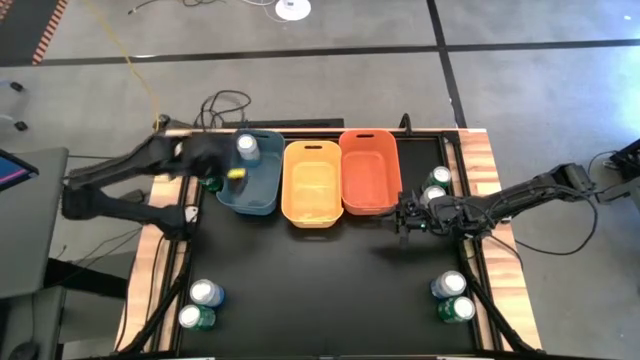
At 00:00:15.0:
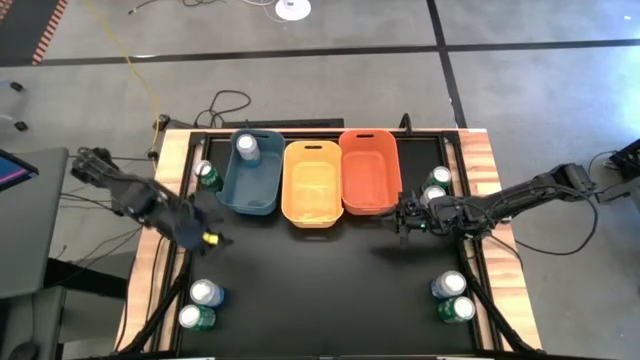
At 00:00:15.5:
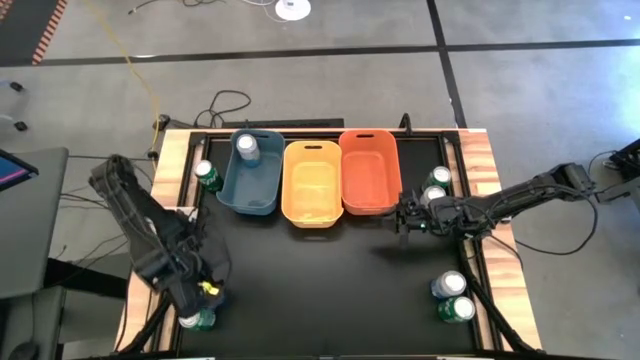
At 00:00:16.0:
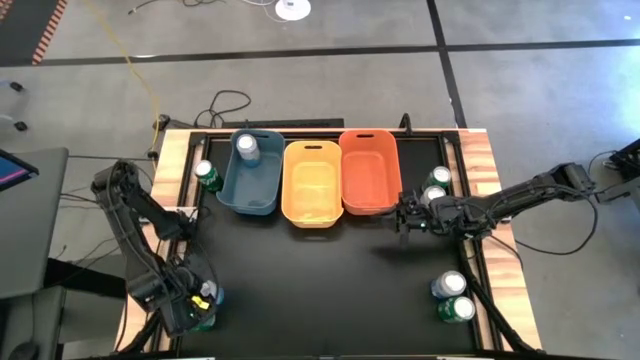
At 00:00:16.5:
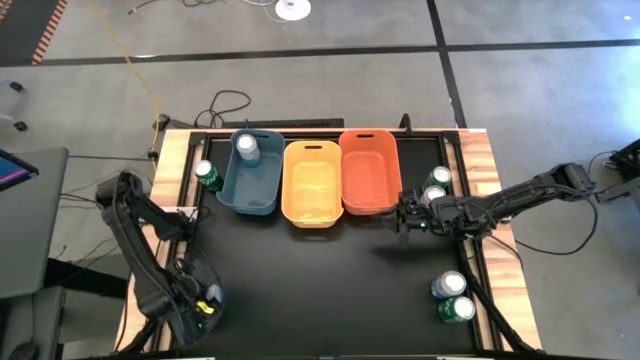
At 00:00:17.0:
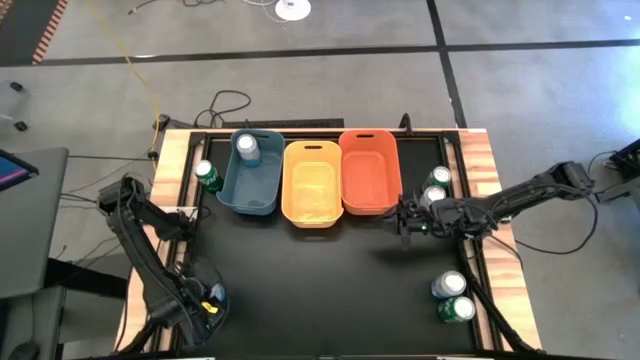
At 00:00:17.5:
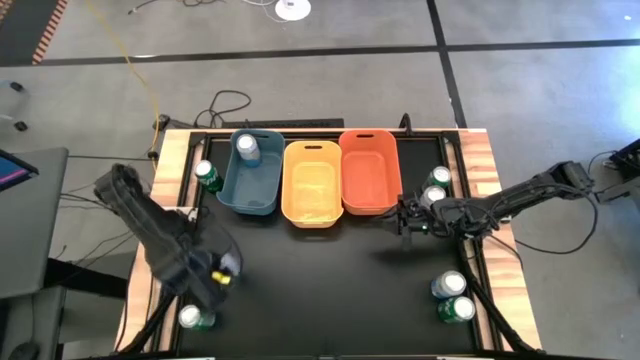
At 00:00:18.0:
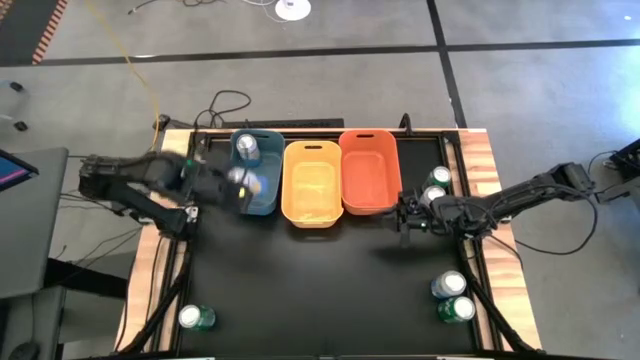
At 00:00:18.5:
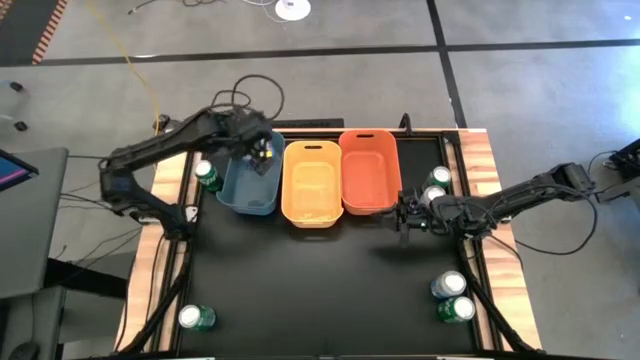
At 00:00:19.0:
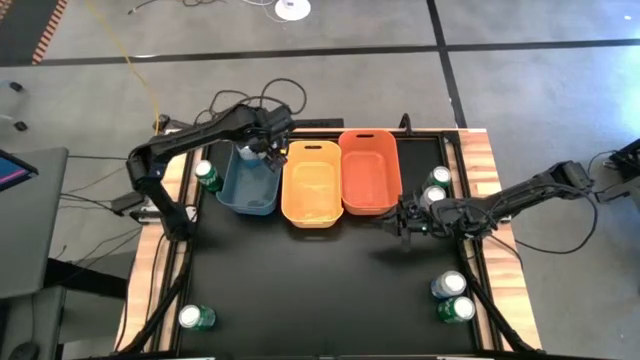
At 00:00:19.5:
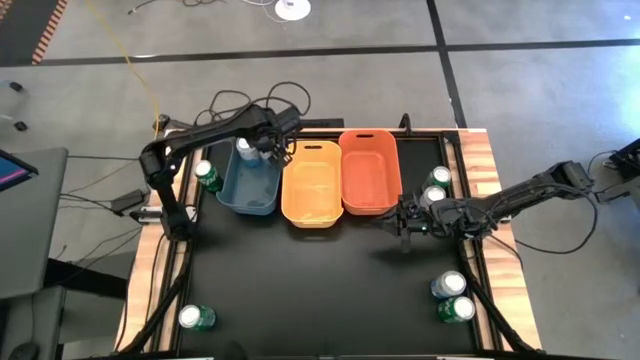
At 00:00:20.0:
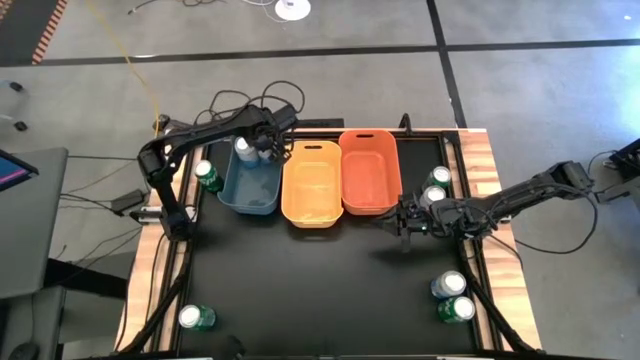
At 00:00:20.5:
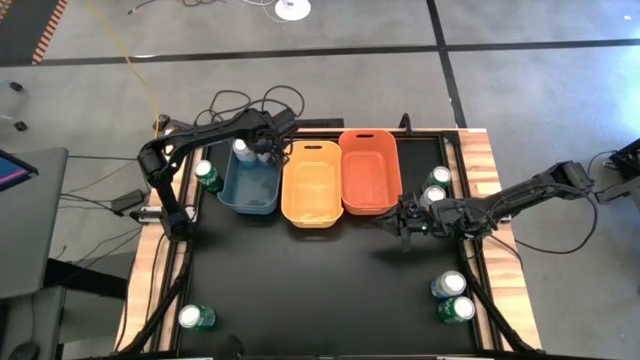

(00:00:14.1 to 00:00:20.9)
Task: Sort soda cans
Put the blue/white soda can into the blue bin

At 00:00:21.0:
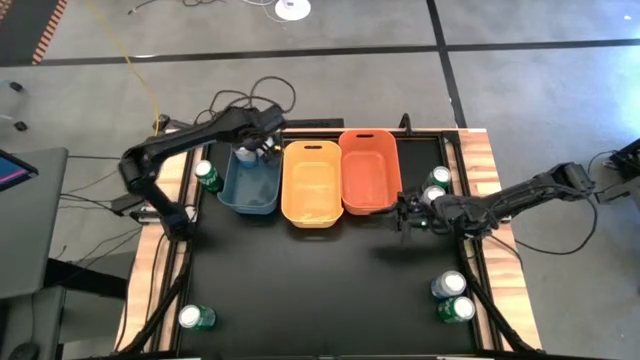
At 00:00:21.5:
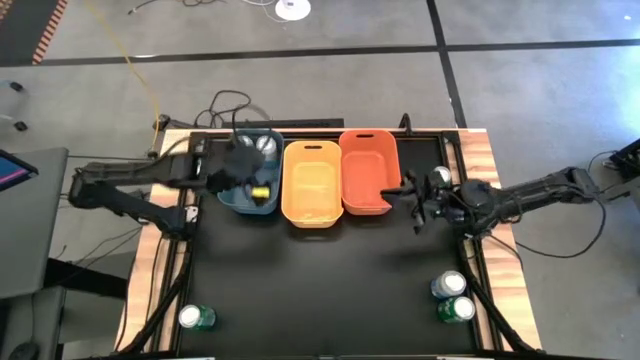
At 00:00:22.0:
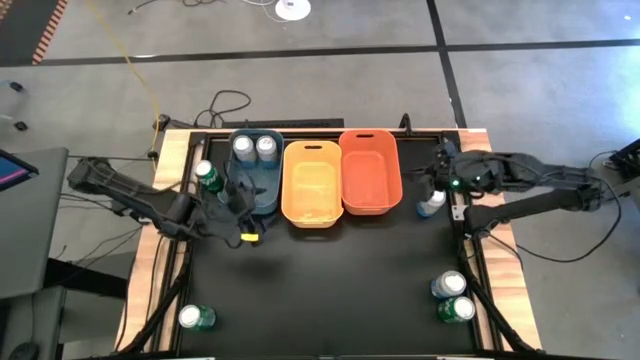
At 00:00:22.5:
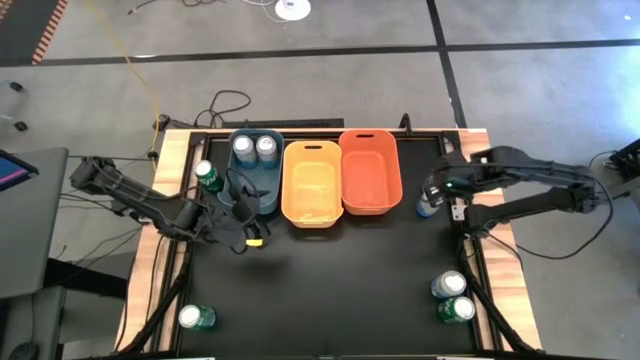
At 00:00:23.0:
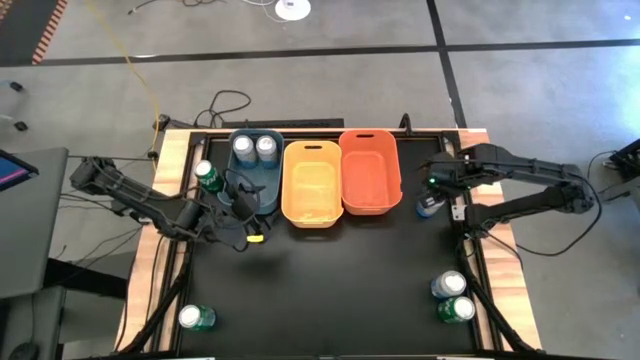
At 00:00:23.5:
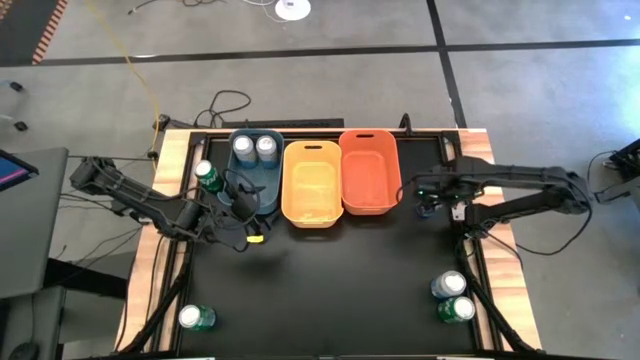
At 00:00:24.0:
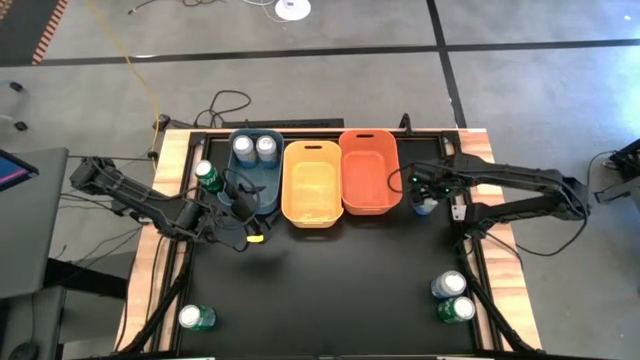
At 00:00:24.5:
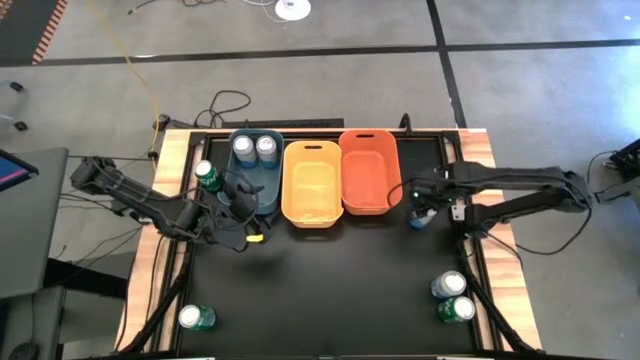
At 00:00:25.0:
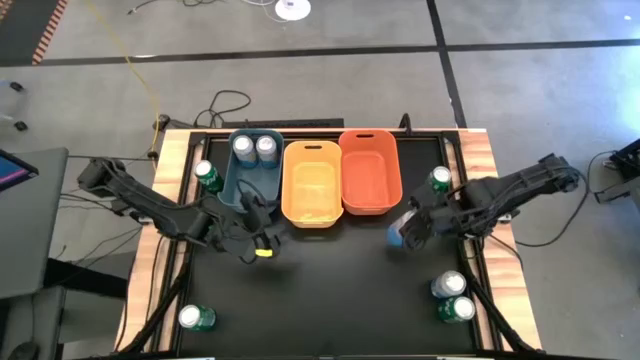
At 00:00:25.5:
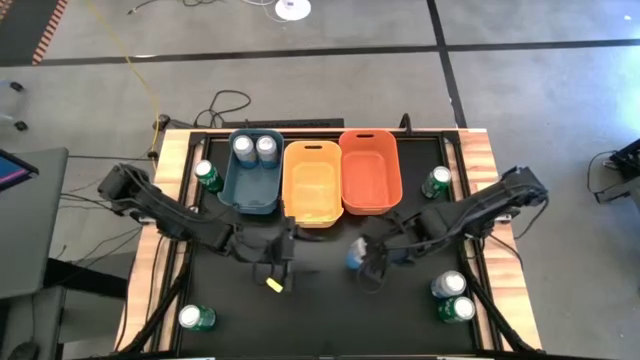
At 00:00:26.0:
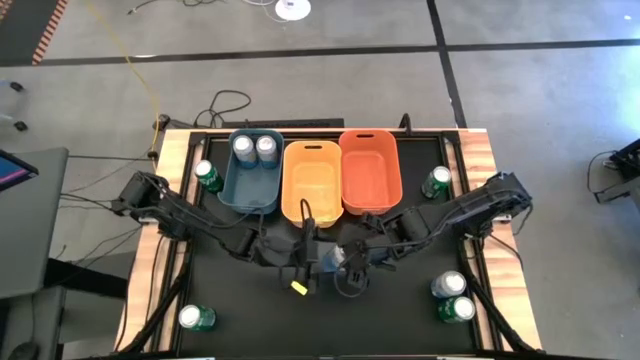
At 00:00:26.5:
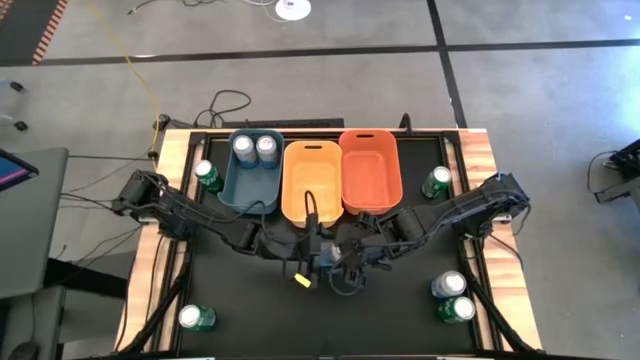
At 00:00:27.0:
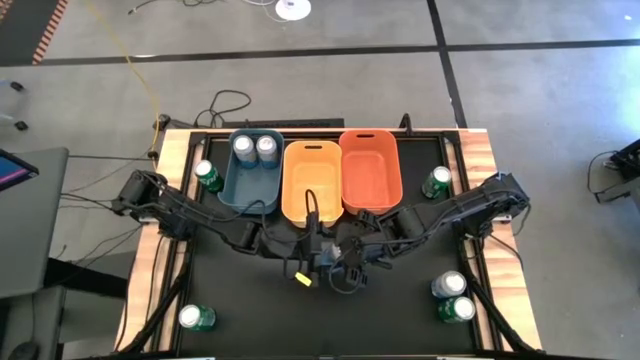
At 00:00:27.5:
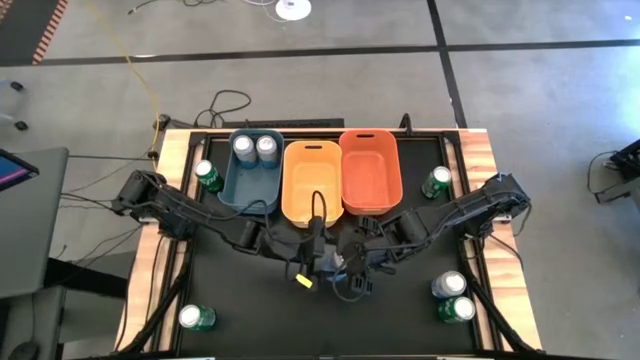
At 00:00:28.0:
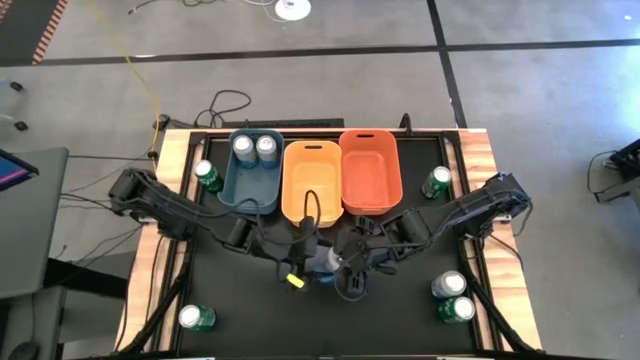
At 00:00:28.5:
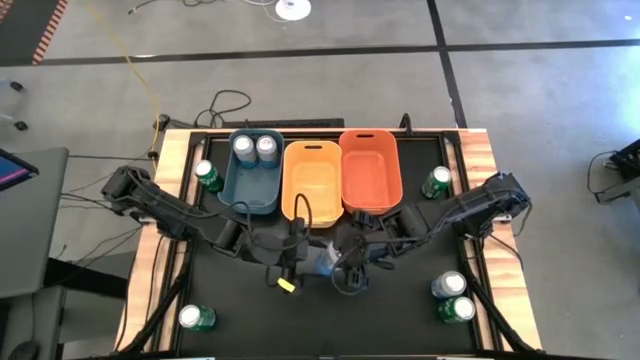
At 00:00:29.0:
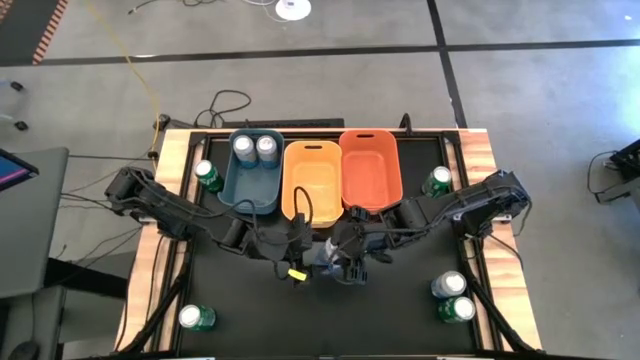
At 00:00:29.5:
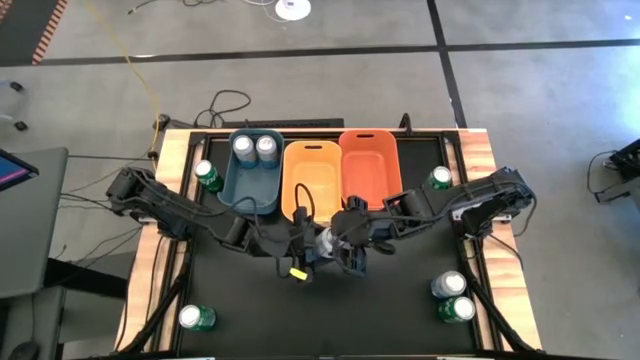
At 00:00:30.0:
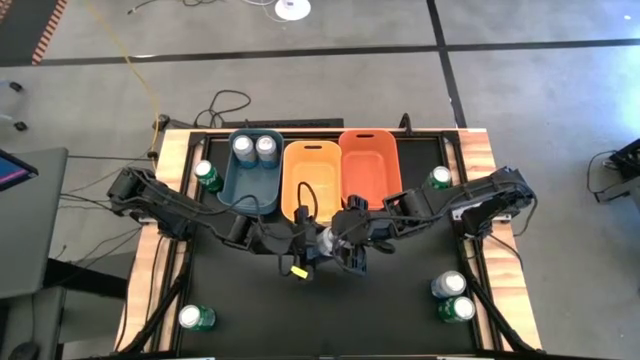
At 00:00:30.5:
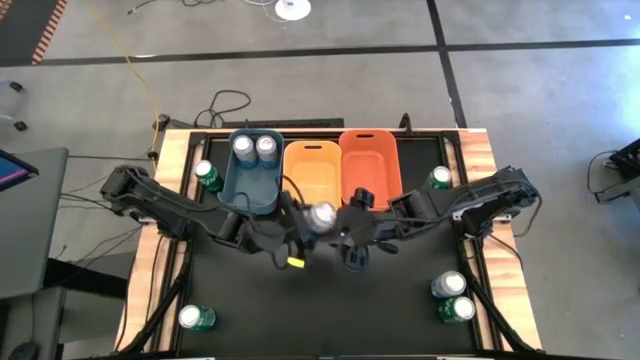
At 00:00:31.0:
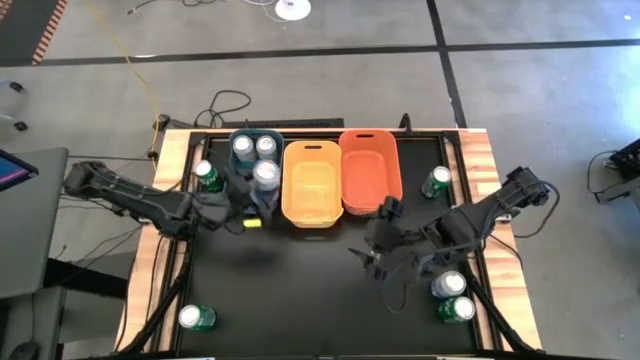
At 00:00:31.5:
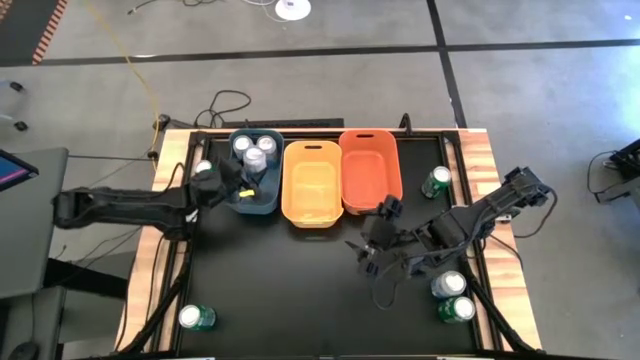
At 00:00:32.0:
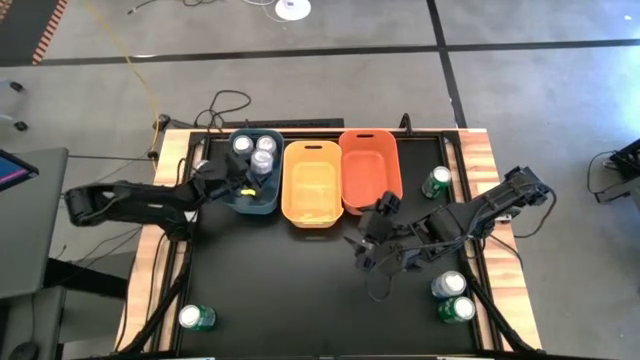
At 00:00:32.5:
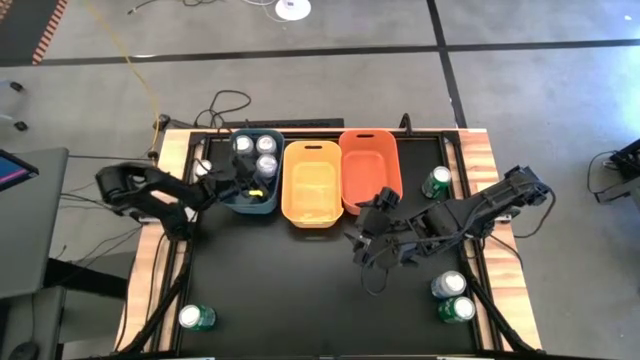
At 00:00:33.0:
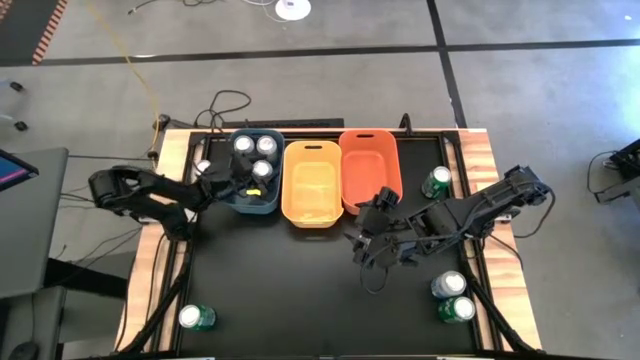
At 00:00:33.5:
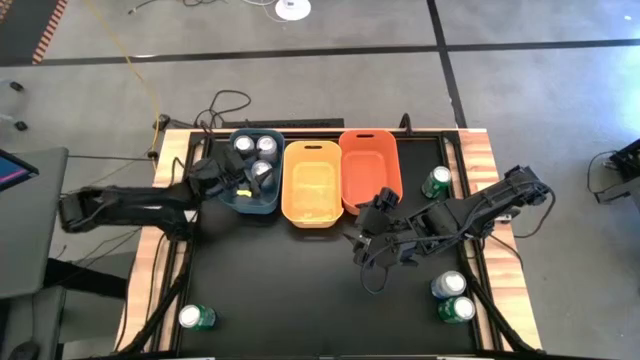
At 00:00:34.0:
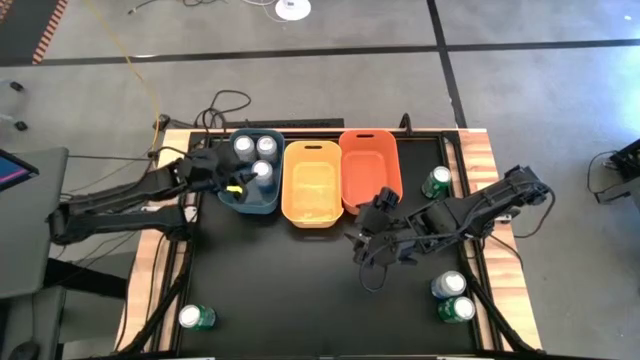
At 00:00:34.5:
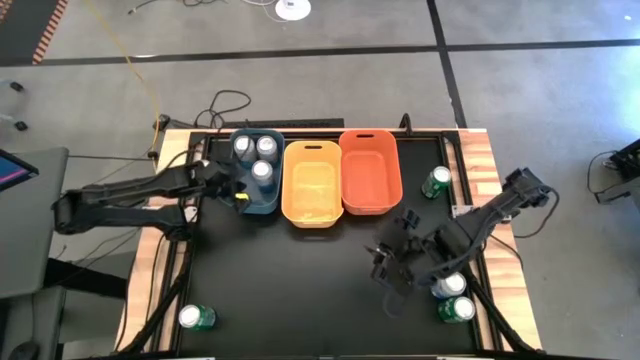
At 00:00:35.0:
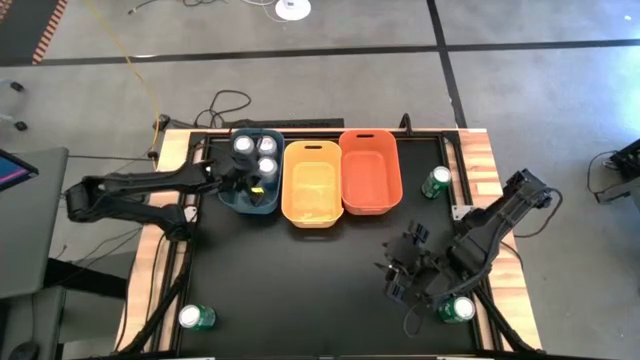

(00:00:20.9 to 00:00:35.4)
Put the blue/white soda can into the blue bin
